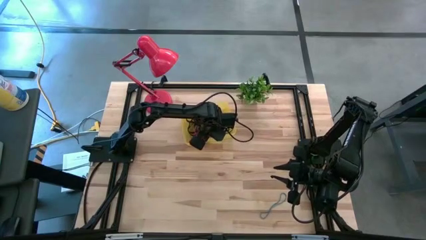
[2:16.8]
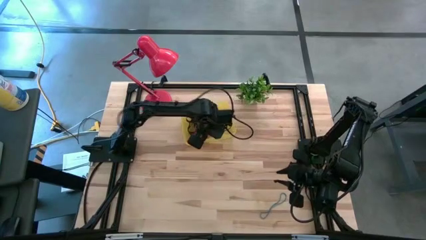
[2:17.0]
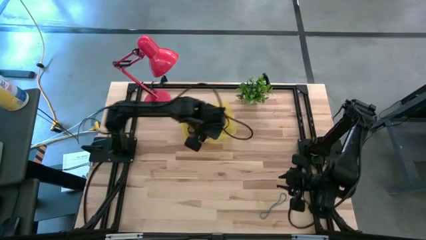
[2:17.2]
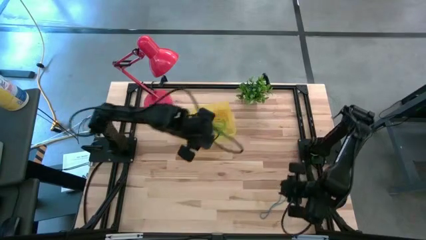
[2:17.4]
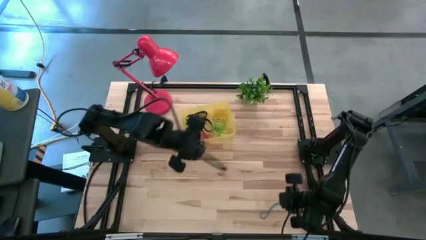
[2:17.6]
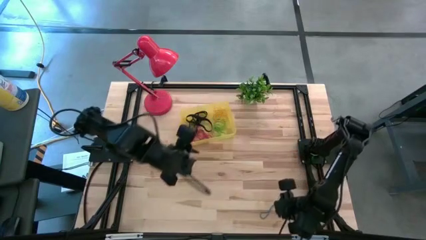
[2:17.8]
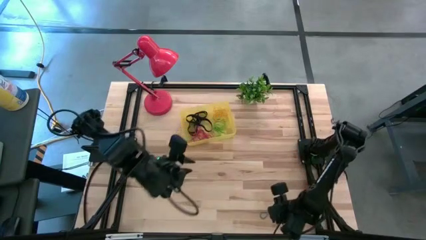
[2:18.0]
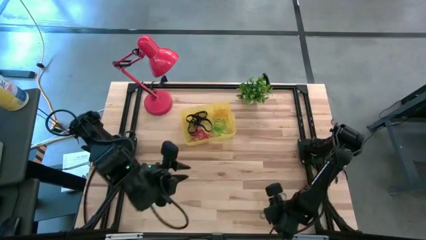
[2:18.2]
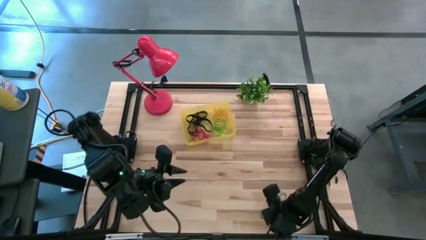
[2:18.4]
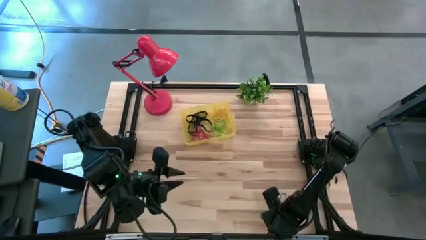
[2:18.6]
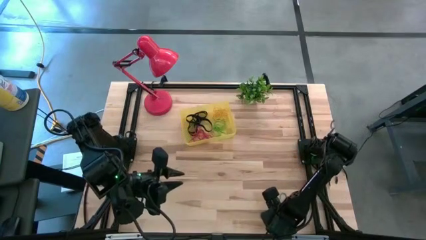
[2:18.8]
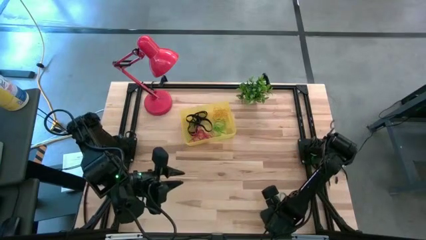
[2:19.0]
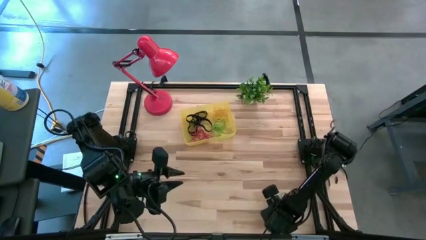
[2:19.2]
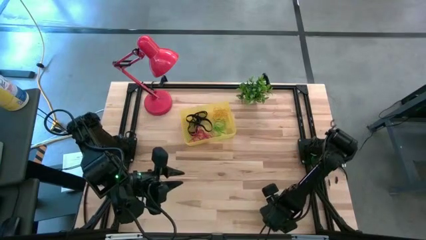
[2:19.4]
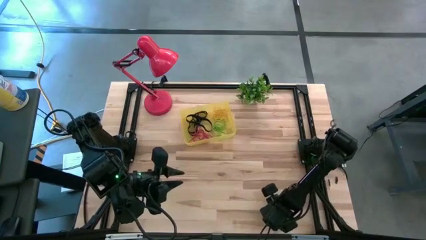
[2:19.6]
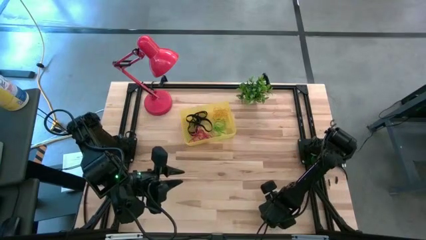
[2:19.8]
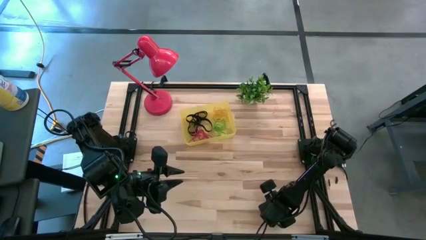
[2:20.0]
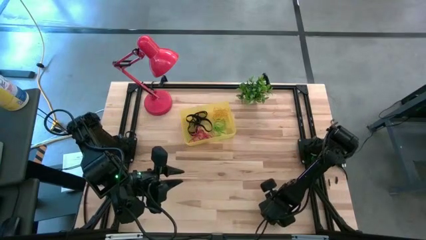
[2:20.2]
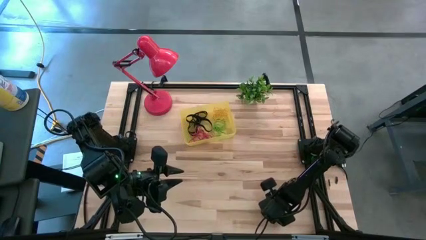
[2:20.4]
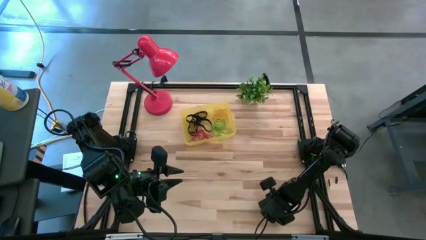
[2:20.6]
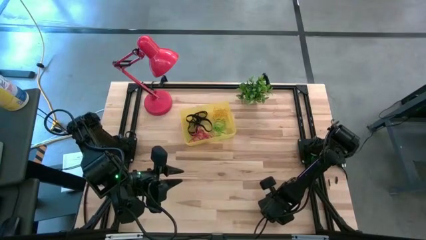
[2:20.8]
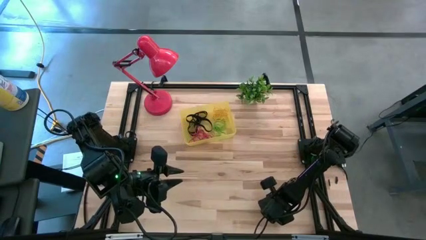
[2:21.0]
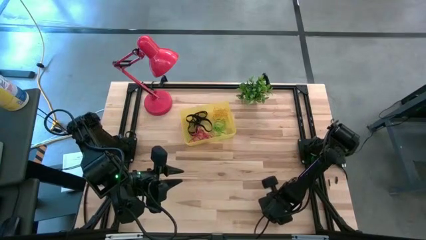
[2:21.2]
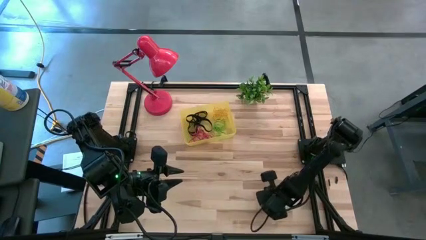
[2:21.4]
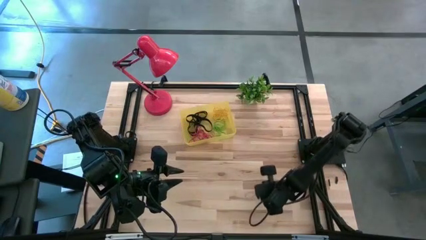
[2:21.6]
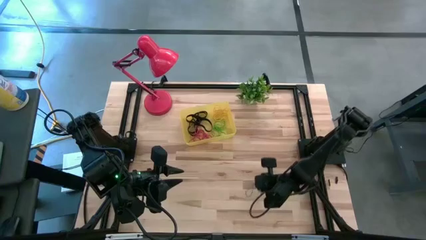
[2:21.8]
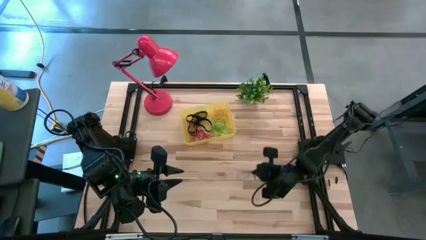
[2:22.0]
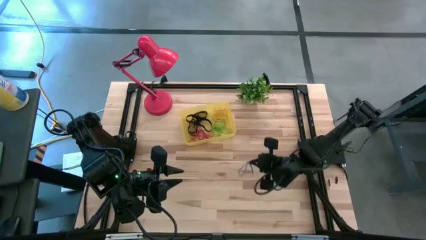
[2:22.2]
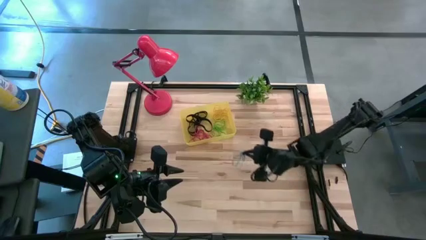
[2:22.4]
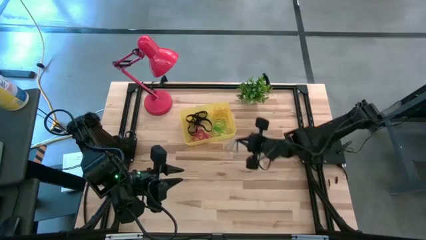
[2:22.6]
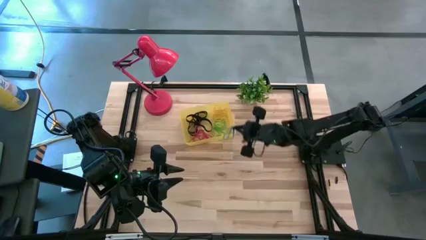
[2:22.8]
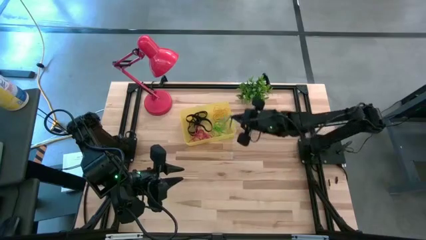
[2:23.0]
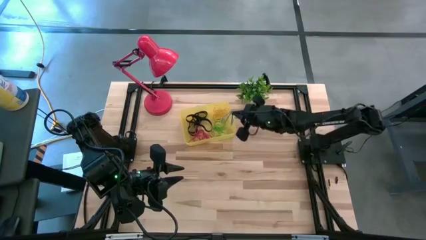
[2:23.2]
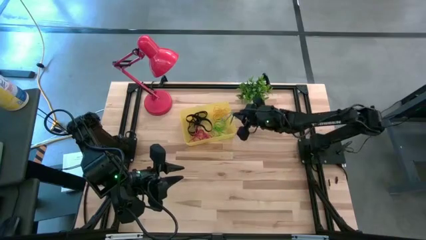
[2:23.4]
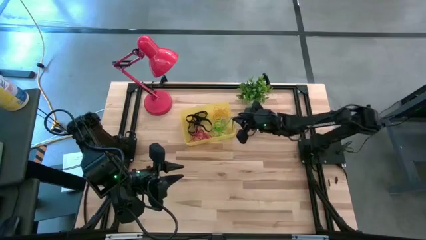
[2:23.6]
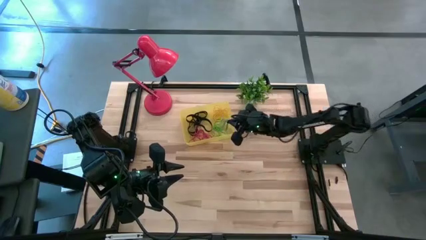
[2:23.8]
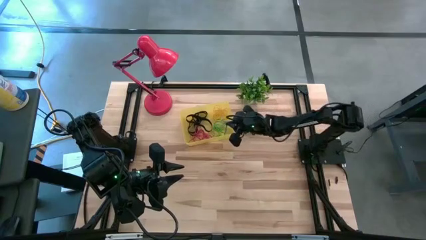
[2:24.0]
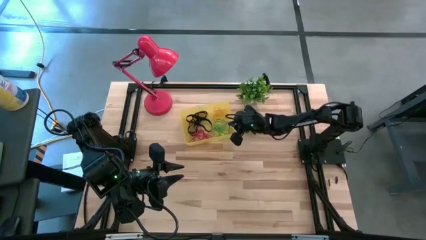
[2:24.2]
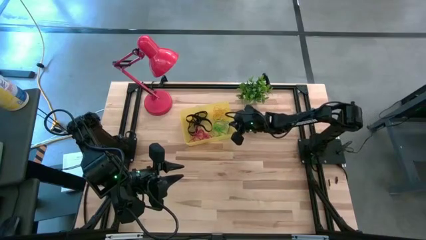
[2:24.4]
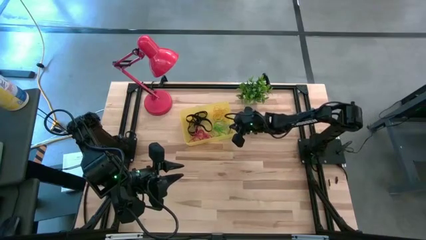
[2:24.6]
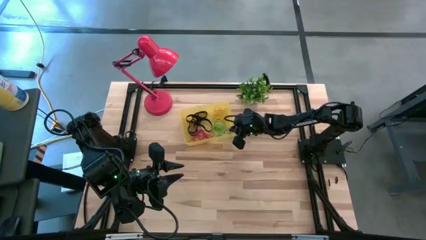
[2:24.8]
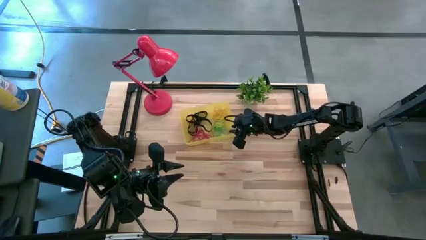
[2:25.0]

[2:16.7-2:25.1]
Task: Pick and place rubber bands into bin
Put the blue rubber band into the yellow bin

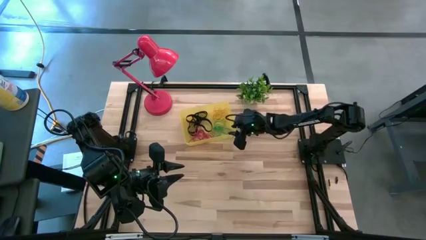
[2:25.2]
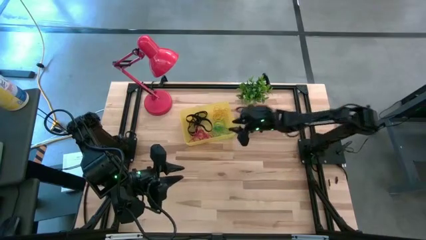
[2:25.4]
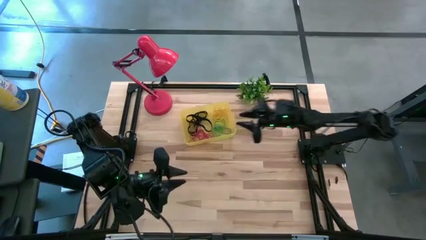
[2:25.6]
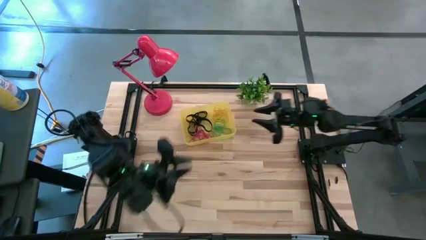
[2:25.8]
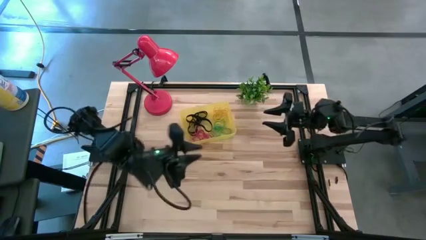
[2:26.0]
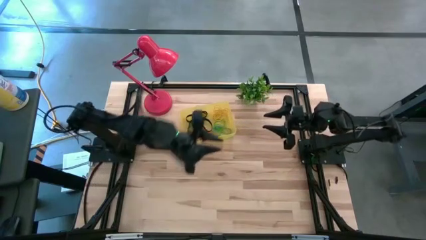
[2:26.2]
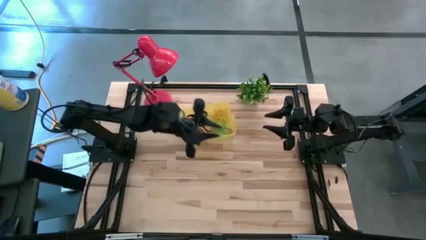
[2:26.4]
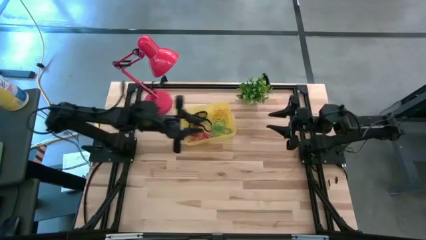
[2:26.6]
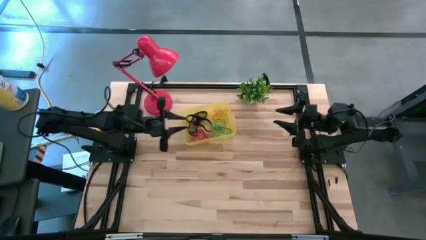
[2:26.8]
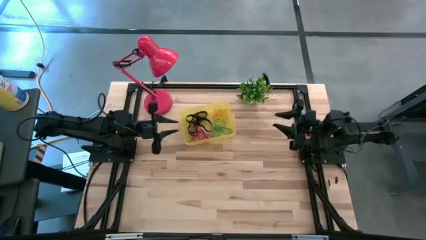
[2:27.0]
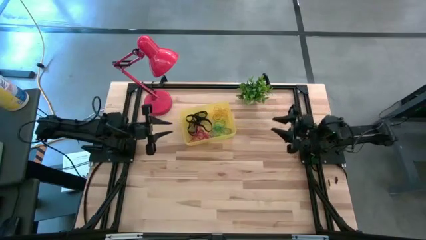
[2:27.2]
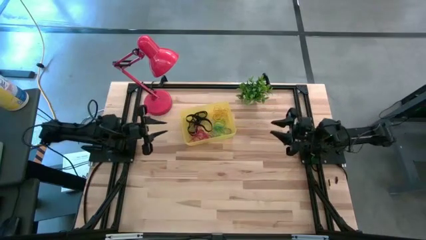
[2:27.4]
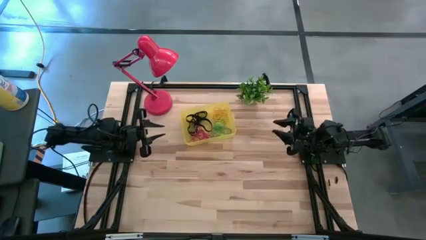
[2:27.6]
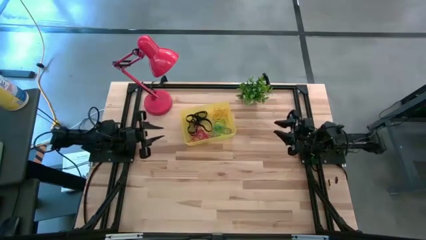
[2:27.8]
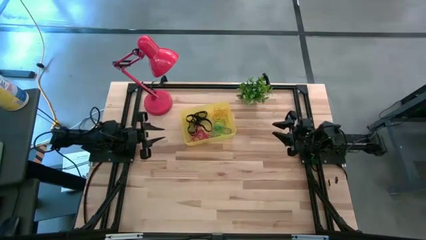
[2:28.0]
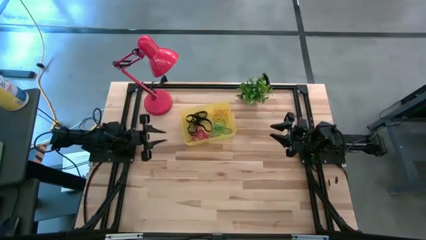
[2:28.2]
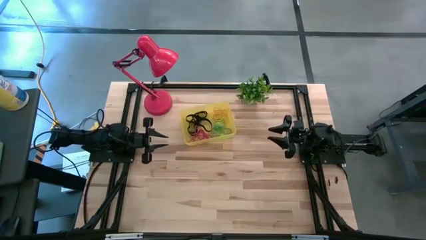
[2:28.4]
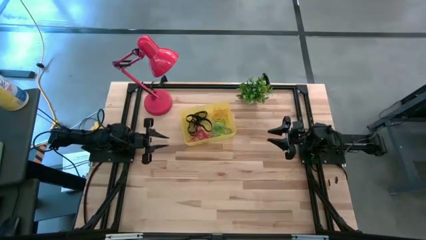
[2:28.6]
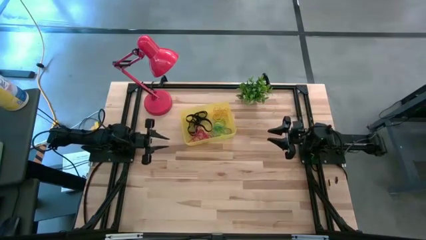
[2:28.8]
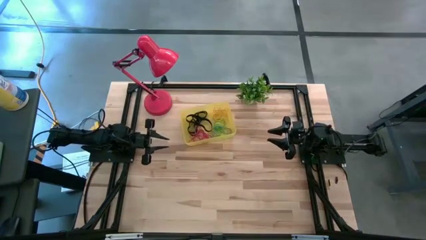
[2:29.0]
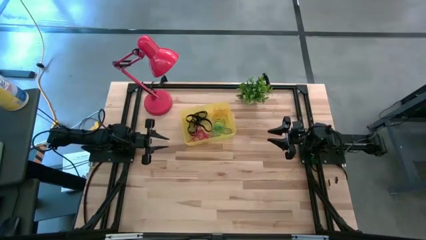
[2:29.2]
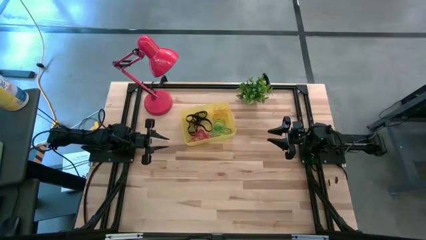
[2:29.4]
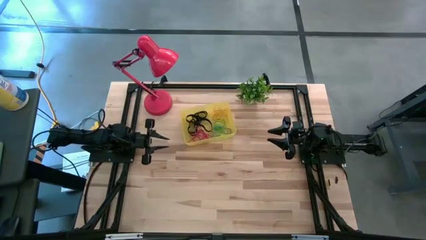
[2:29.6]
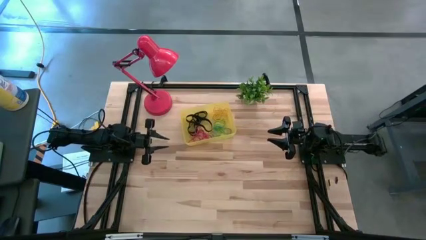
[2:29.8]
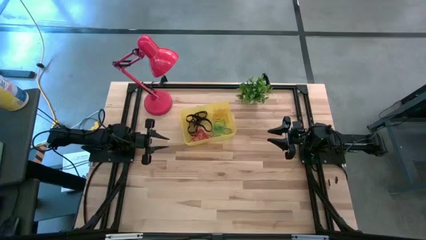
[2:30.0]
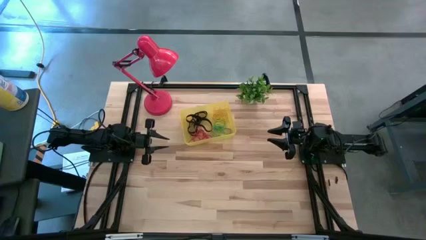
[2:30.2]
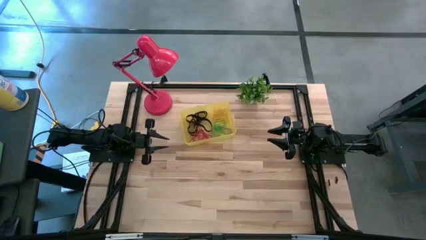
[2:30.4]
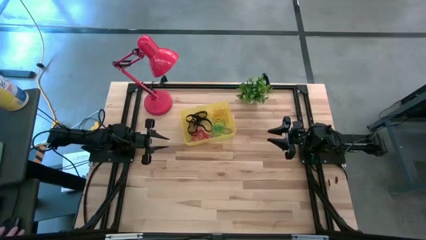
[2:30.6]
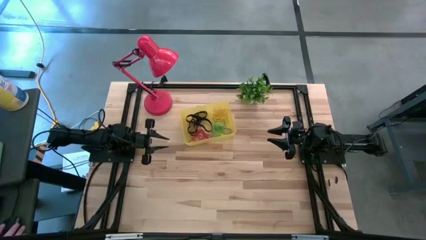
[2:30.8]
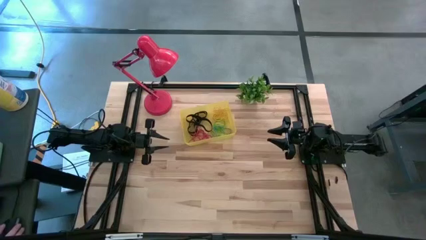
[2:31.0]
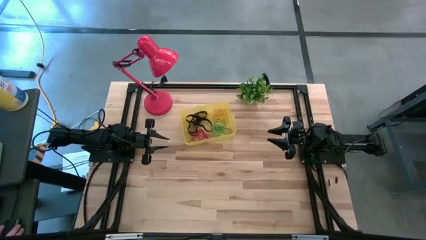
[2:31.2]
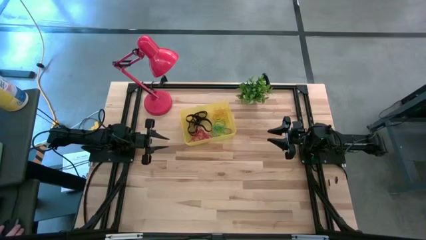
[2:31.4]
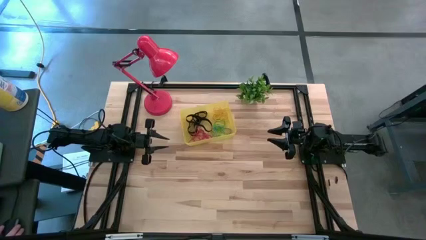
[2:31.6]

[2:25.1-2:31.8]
Return to Home Position

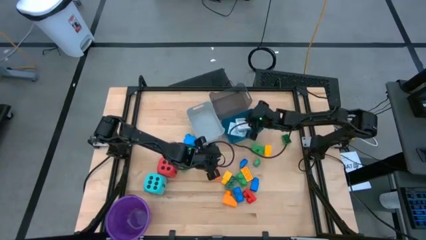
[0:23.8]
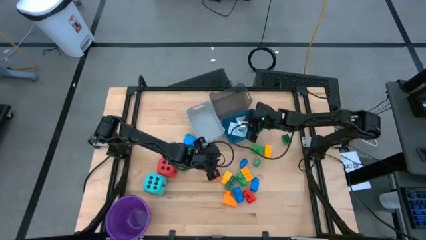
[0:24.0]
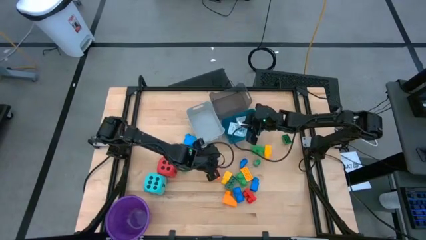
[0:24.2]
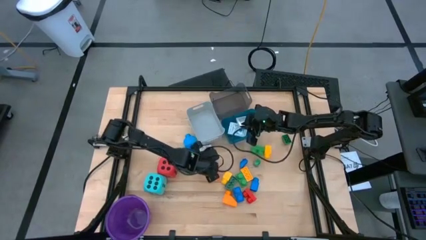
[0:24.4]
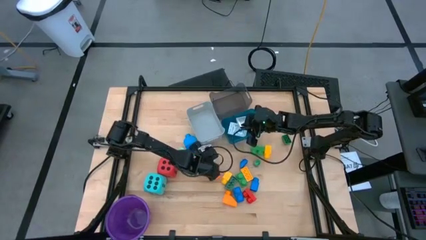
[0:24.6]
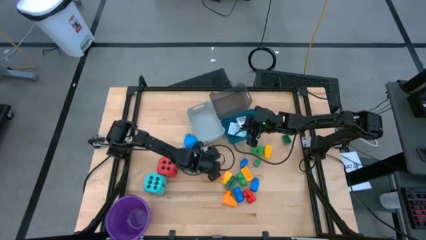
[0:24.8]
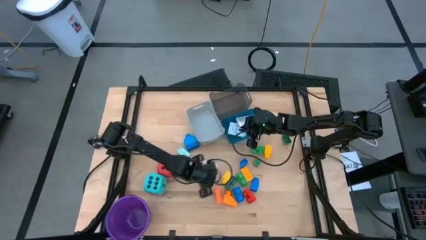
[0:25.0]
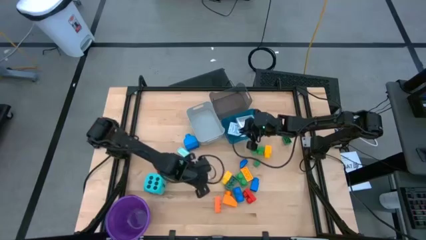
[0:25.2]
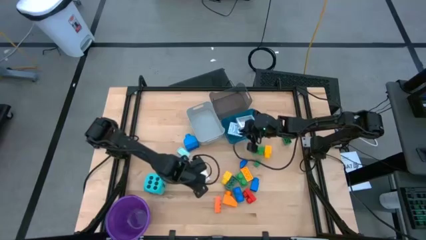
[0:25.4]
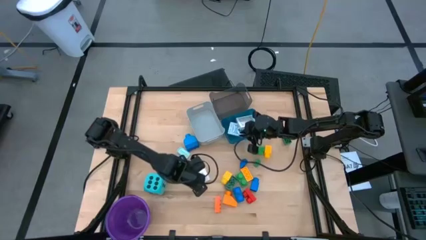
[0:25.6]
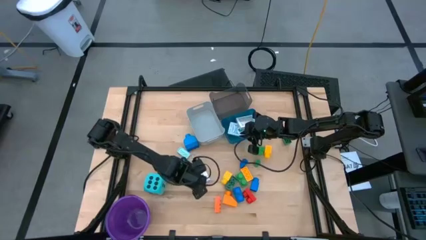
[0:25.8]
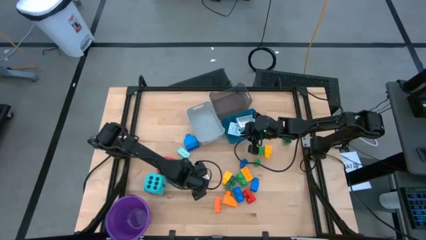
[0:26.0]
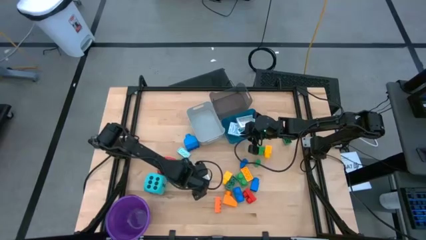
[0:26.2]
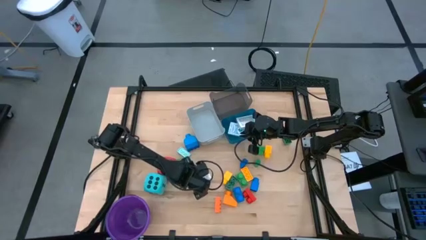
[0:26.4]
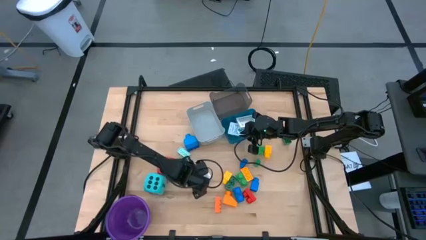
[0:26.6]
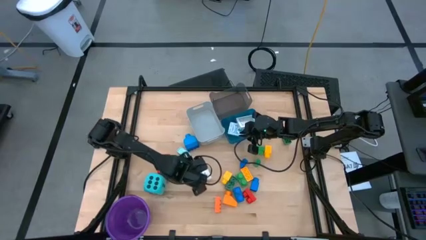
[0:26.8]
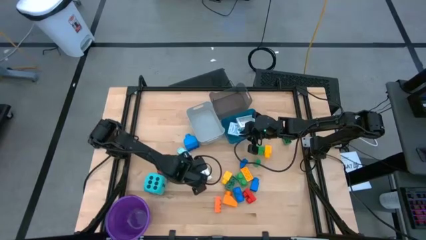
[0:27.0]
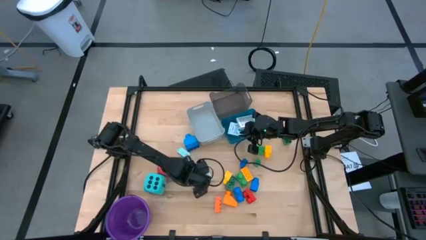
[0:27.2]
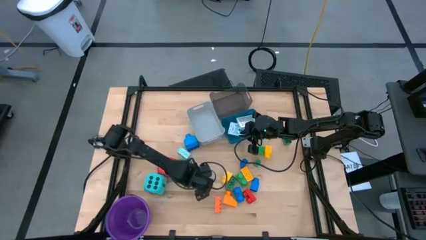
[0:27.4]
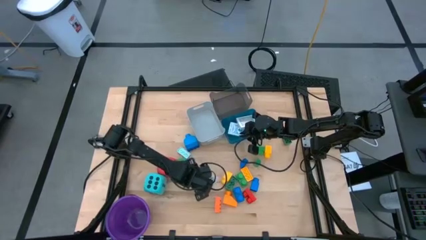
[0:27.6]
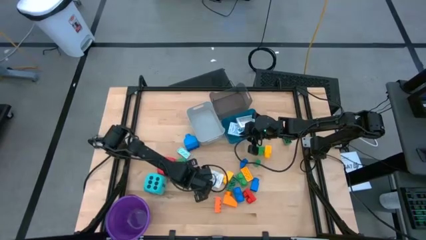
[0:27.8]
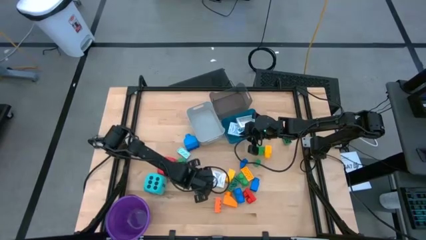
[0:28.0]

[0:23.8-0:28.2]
Task: Pick & Place Toys
Put the black deck of cards into the blue bin
